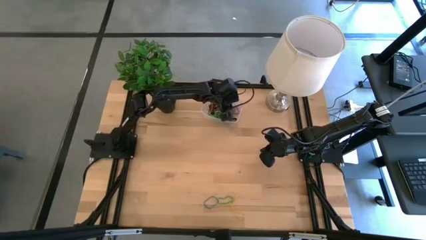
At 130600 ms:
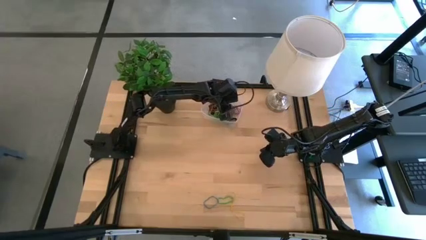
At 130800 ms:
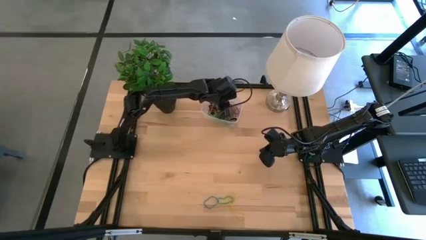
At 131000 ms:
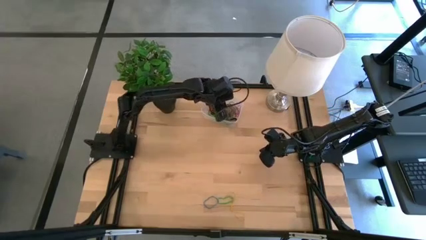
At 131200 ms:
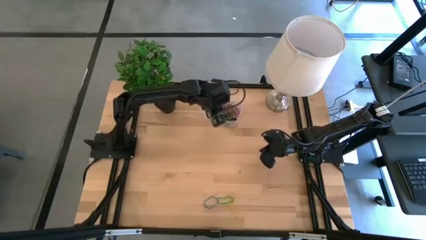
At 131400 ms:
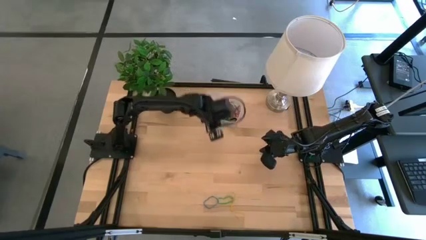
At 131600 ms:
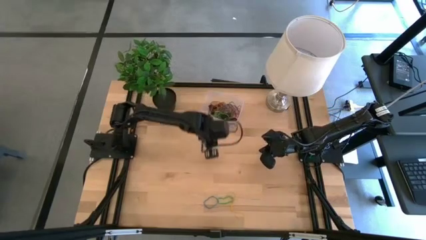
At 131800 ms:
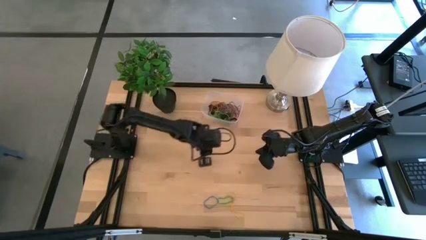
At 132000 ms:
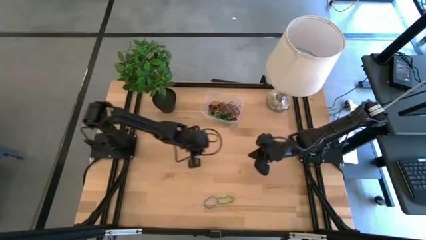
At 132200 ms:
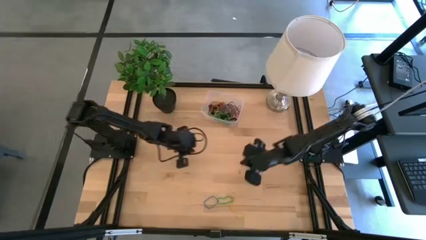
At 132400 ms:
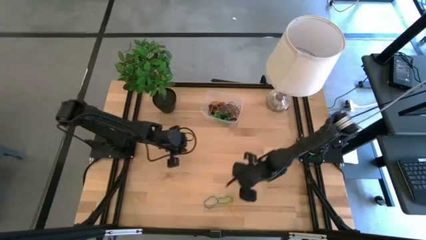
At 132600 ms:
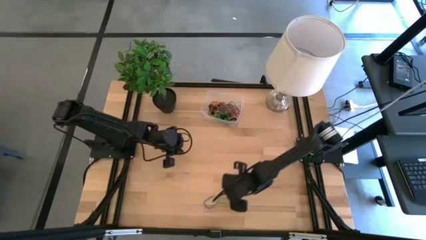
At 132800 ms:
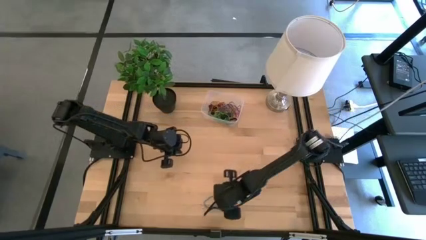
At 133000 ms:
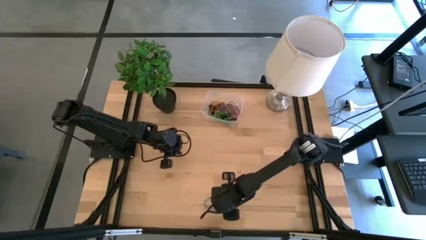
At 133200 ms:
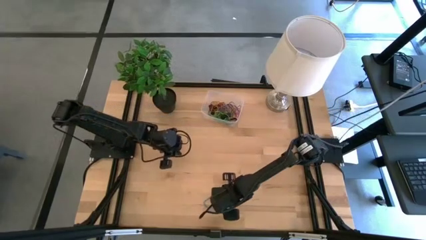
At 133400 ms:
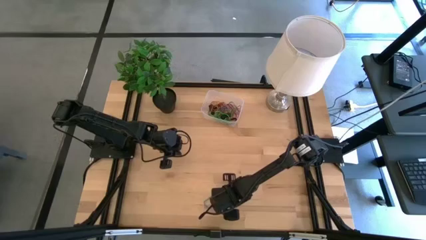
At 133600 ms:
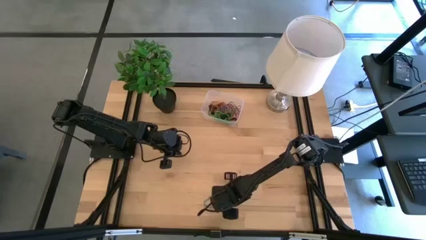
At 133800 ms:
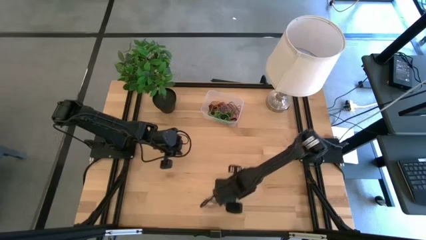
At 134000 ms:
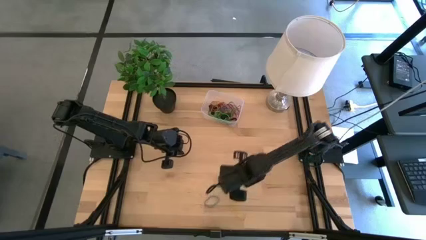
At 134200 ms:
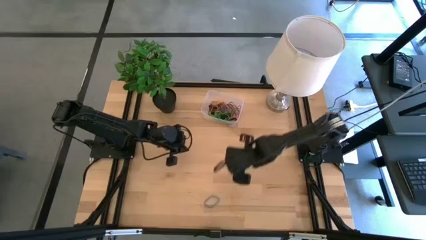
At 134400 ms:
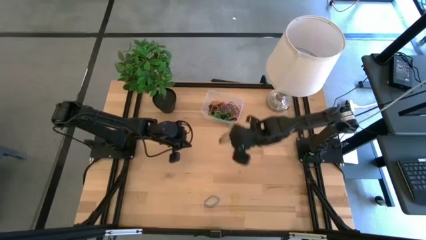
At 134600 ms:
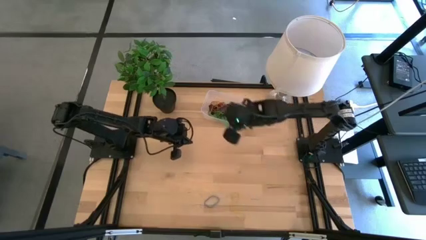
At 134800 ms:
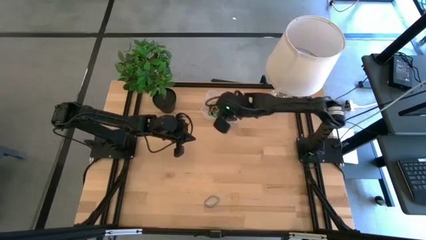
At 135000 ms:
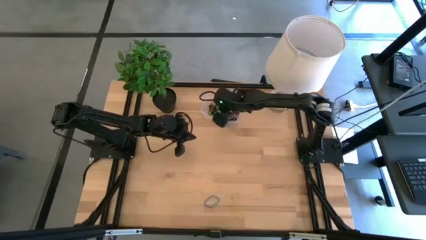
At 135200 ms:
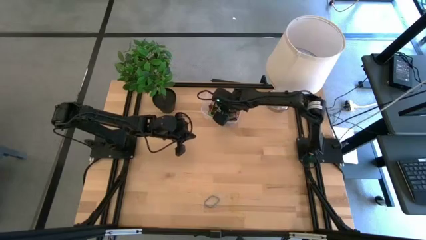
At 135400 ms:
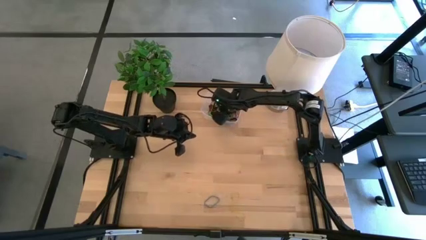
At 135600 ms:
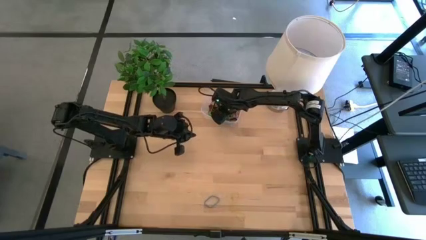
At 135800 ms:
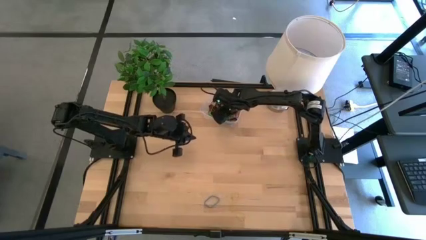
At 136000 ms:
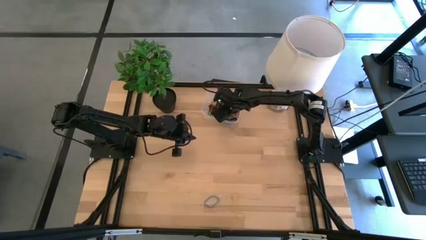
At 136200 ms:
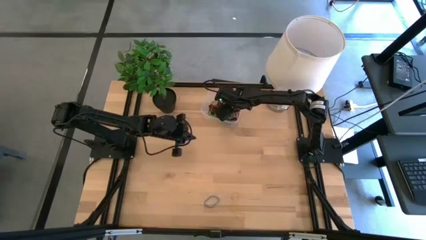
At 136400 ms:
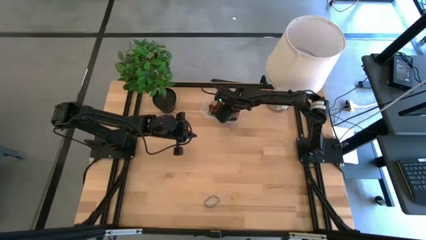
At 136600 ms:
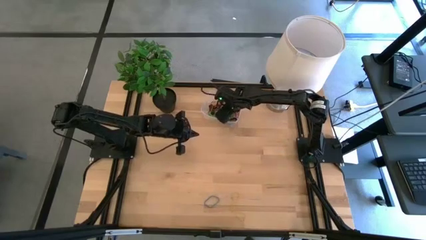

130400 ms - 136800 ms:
Task: Pick and place rubber bands into bin
Put the green rubber band into the transparent bin

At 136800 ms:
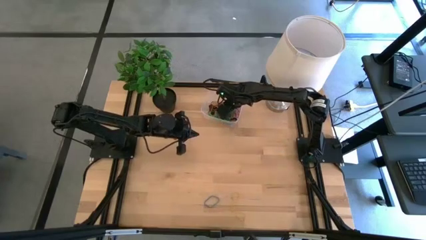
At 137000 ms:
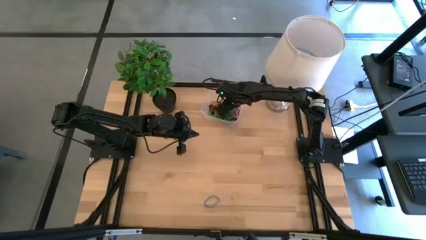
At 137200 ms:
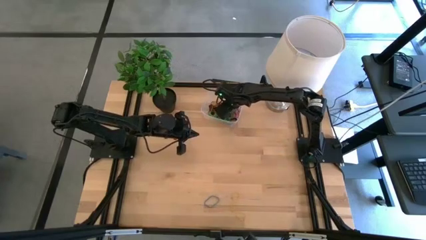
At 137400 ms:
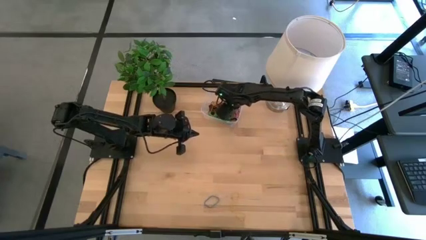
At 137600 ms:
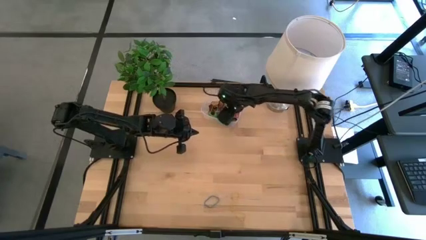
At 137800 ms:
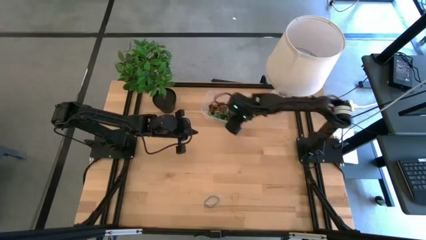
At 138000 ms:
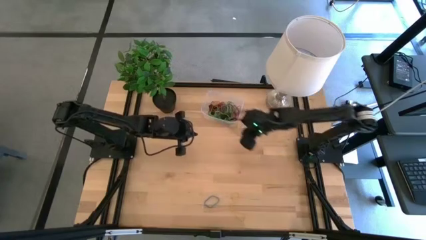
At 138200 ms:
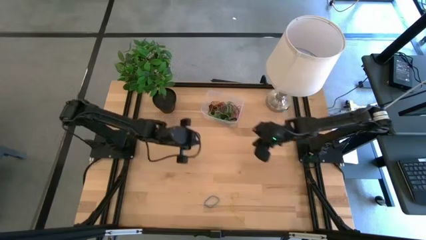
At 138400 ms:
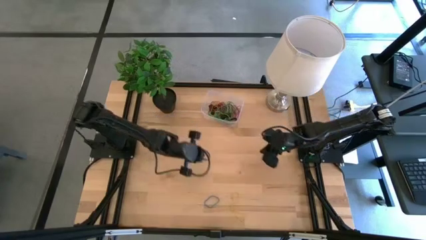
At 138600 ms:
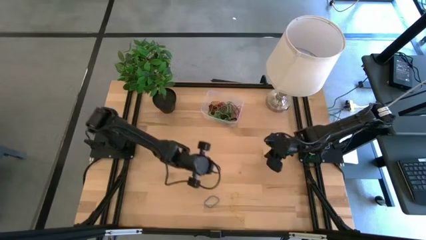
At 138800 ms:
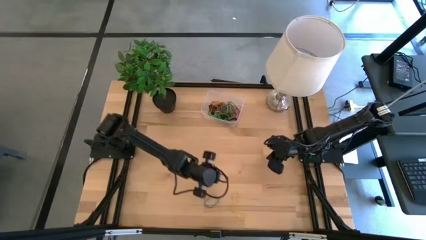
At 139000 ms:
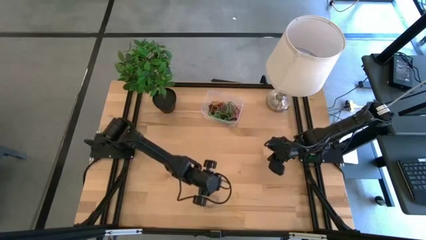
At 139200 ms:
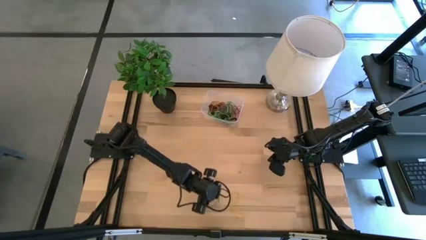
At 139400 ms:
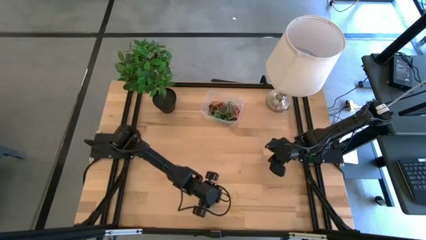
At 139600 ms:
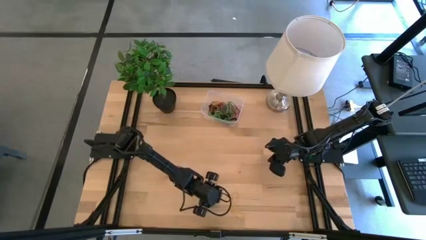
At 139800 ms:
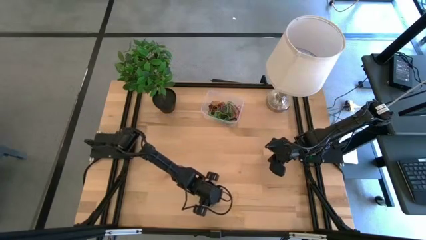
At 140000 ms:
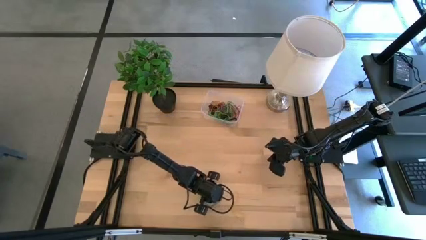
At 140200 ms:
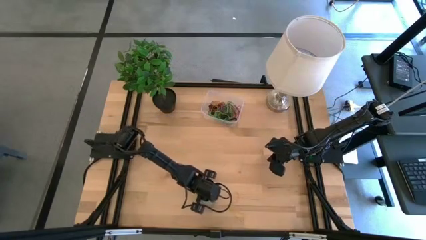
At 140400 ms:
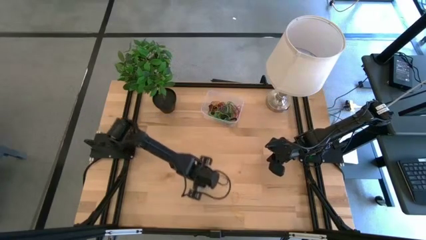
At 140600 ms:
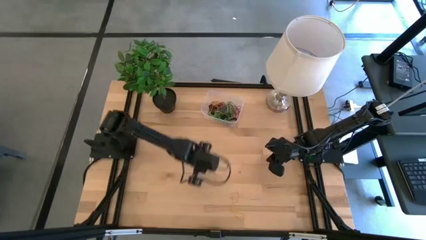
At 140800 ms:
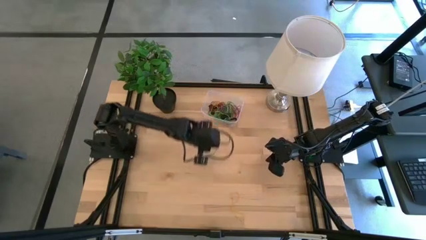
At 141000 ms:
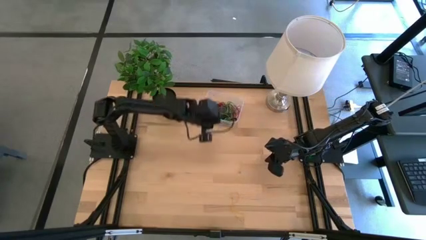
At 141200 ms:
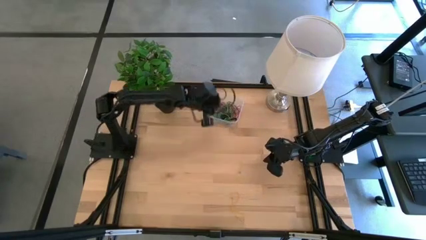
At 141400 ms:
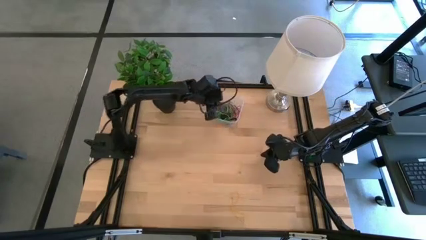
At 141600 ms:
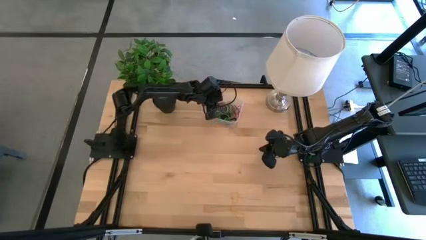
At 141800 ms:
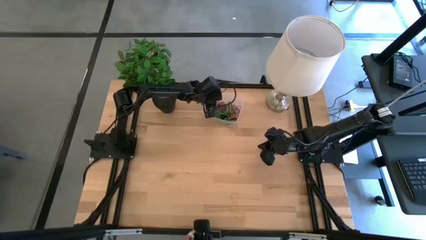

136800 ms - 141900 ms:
Put the blue rubber band into the transparent bin

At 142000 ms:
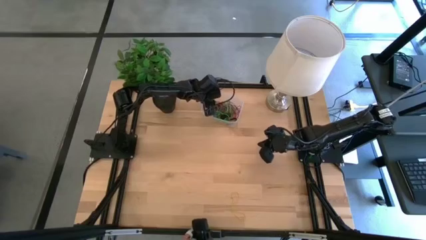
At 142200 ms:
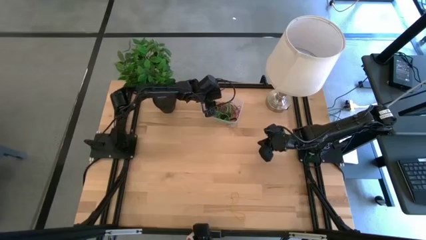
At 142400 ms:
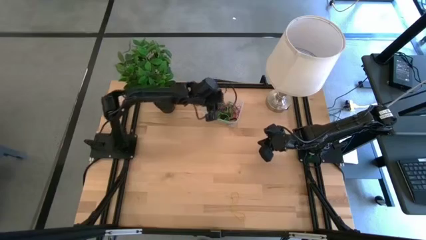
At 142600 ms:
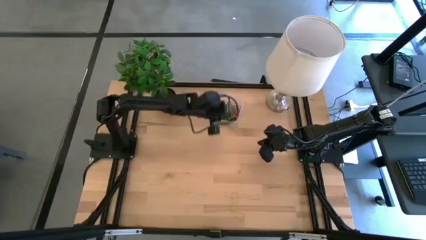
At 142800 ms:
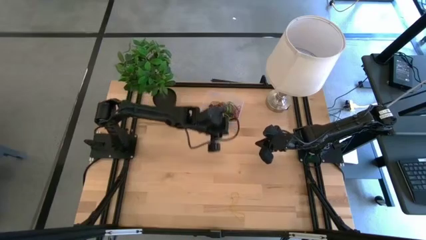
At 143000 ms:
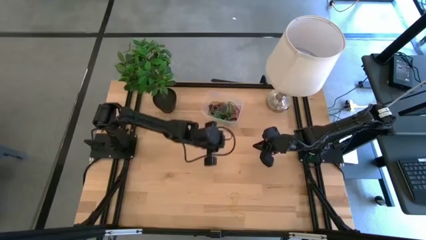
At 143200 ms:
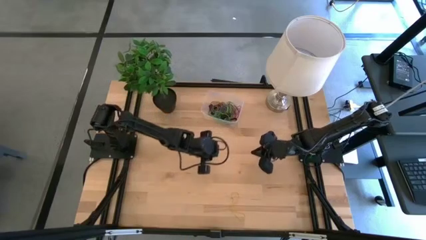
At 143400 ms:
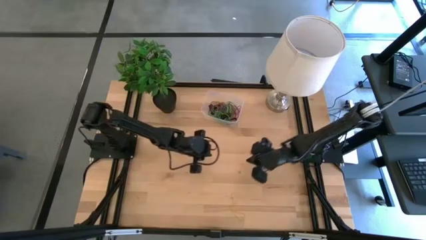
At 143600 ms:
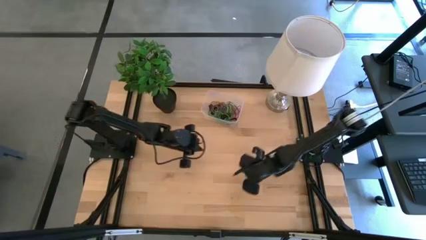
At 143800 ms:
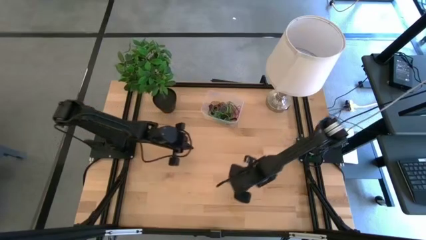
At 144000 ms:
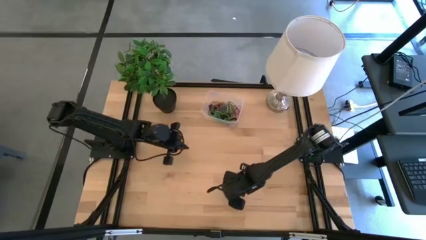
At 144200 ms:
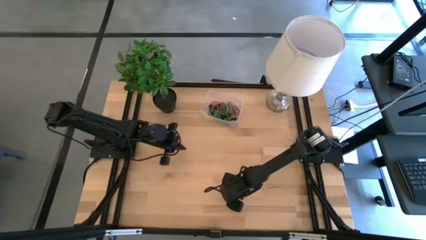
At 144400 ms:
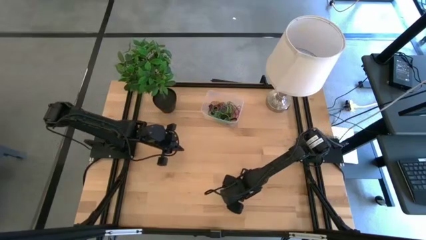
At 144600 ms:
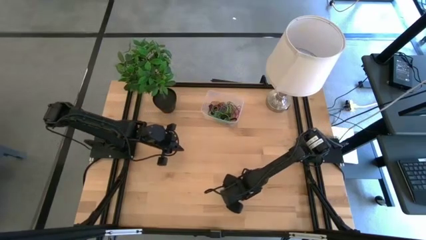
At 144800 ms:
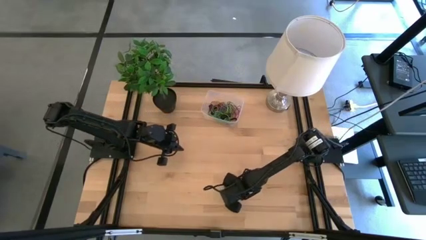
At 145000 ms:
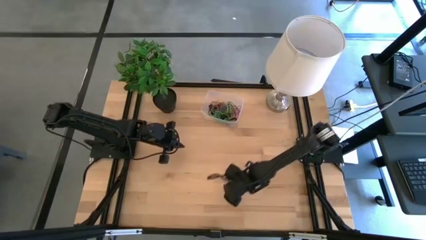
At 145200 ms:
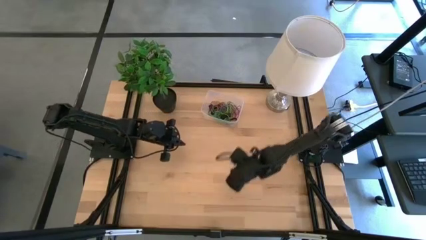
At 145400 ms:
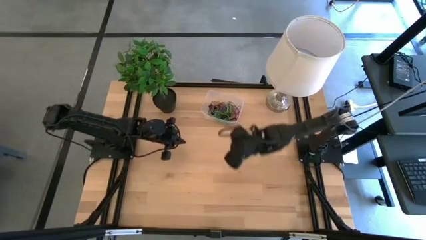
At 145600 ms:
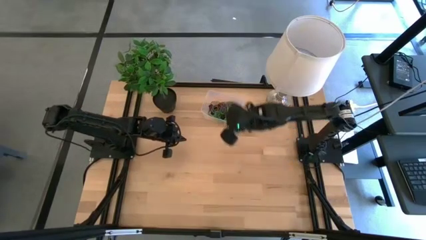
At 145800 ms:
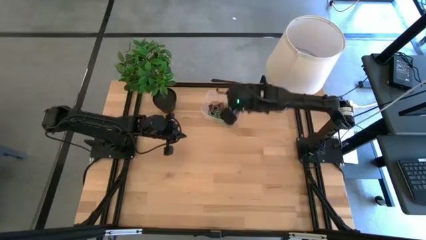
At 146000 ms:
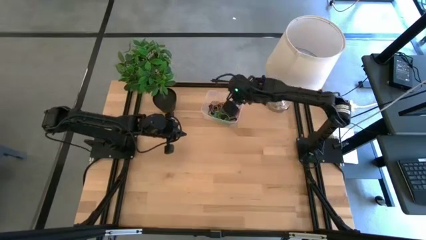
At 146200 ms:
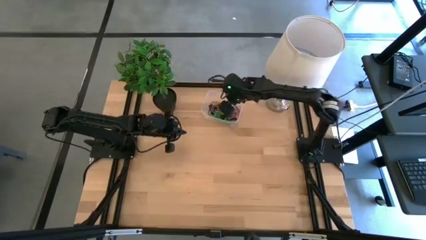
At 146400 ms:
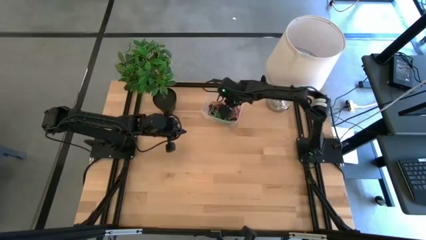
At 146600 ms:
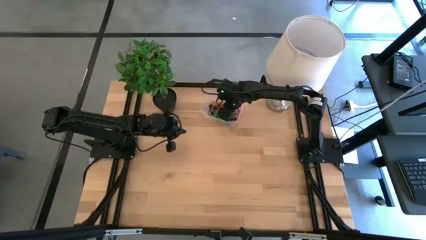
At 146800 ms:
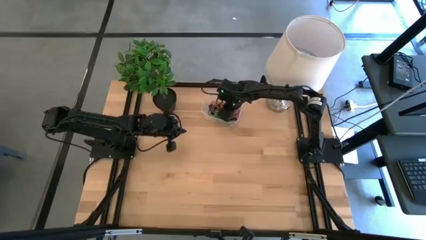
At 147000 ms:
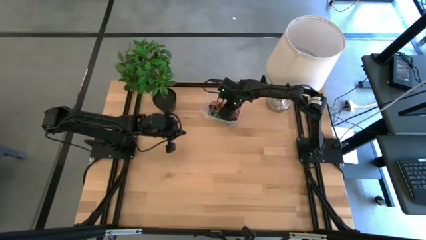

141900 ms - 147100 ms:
Put the yellow rubber band into the transparent bin
